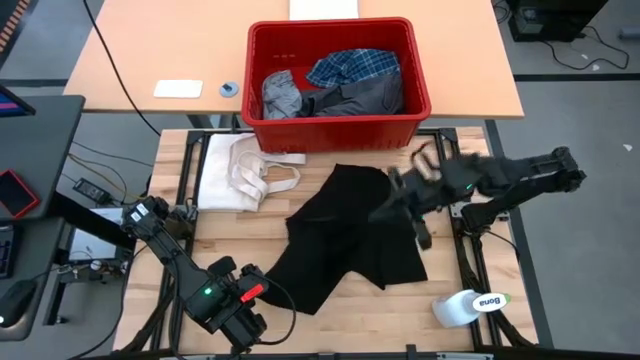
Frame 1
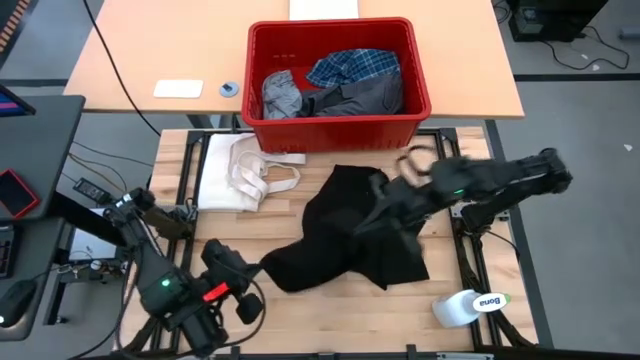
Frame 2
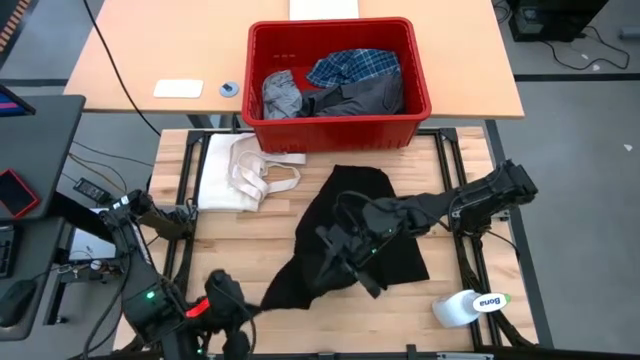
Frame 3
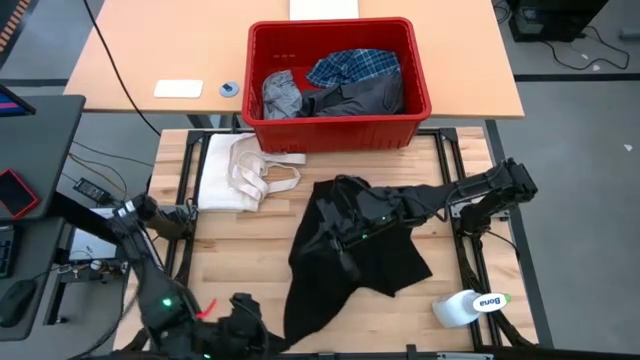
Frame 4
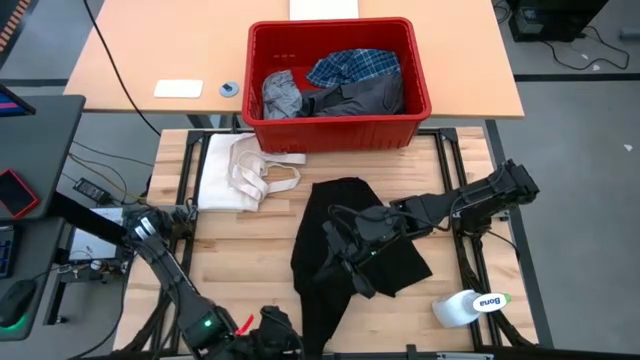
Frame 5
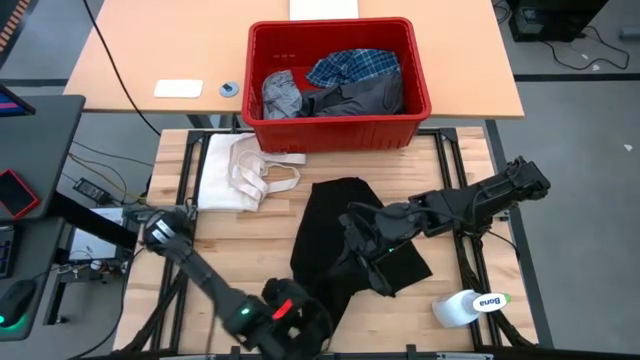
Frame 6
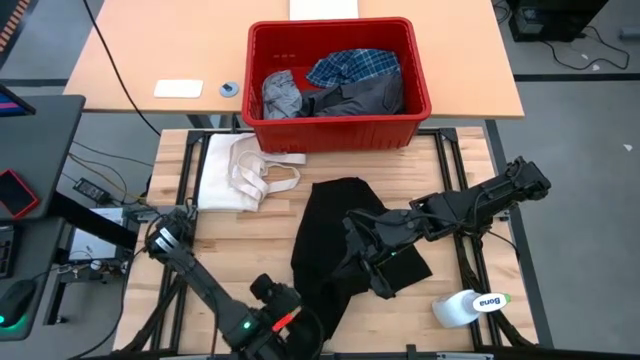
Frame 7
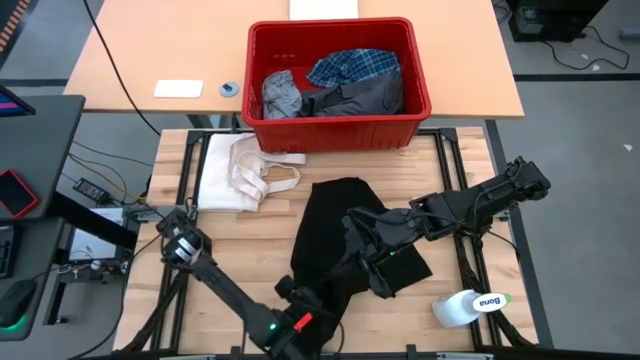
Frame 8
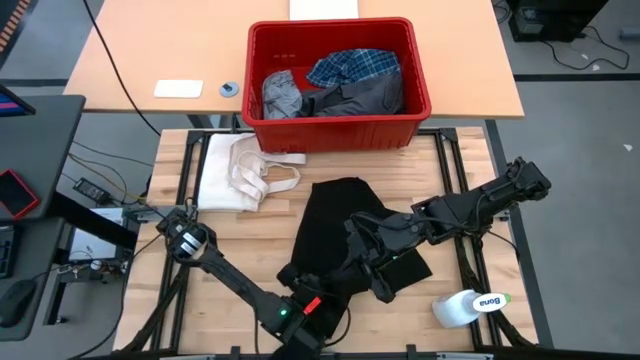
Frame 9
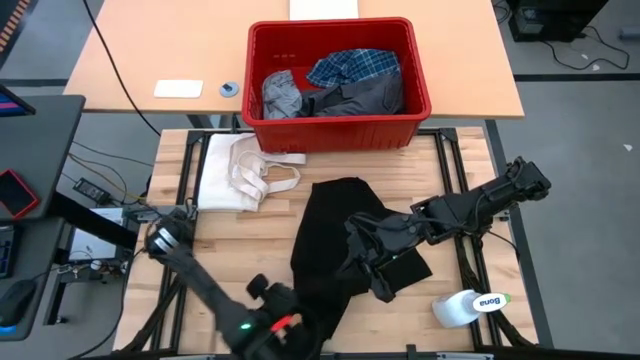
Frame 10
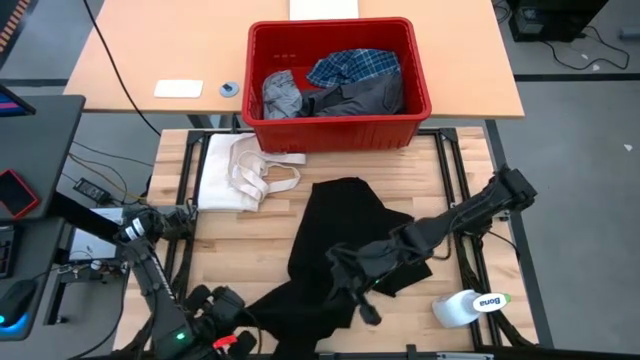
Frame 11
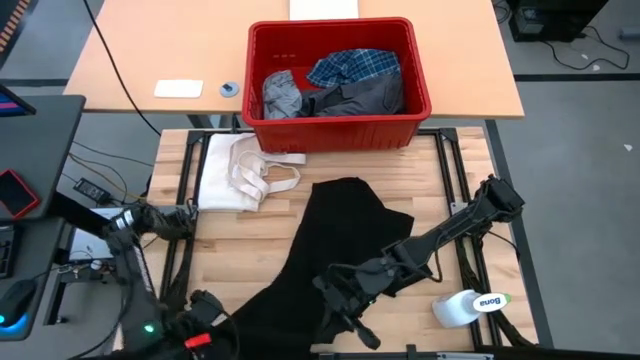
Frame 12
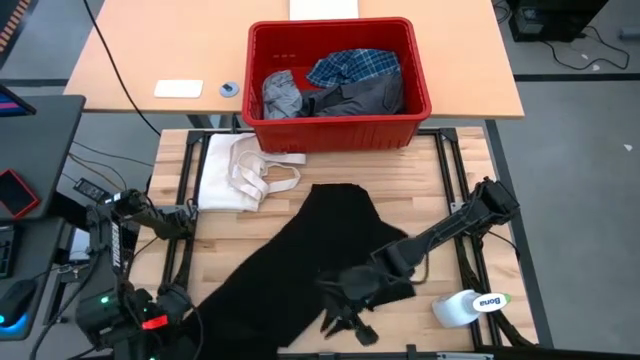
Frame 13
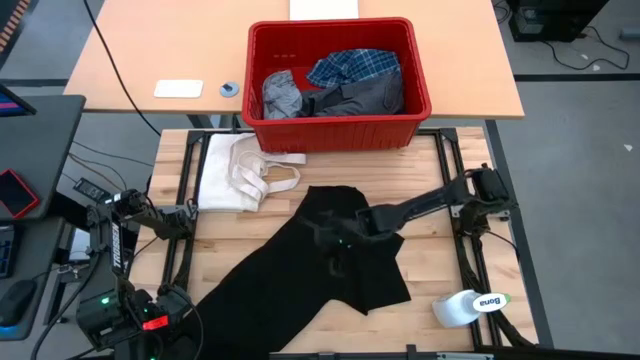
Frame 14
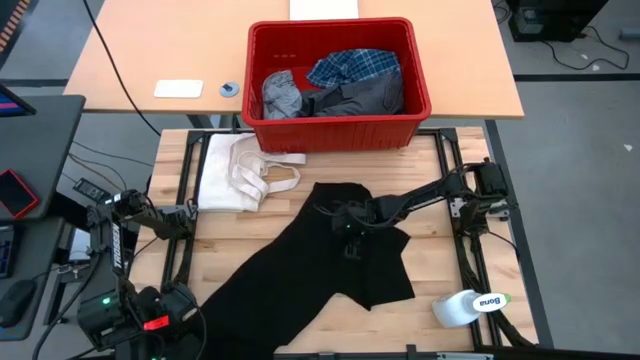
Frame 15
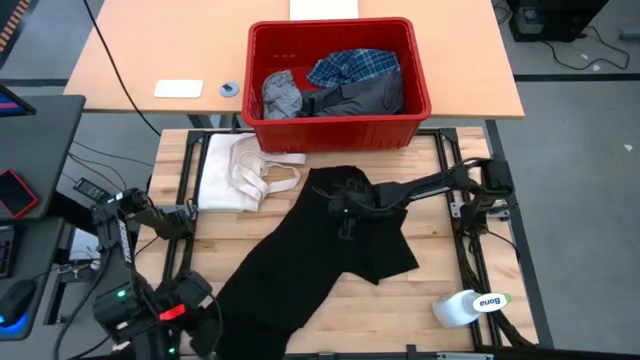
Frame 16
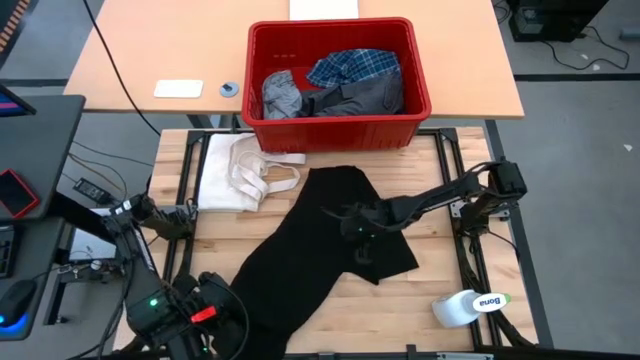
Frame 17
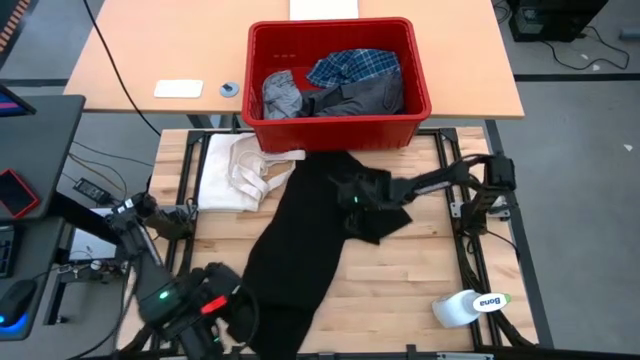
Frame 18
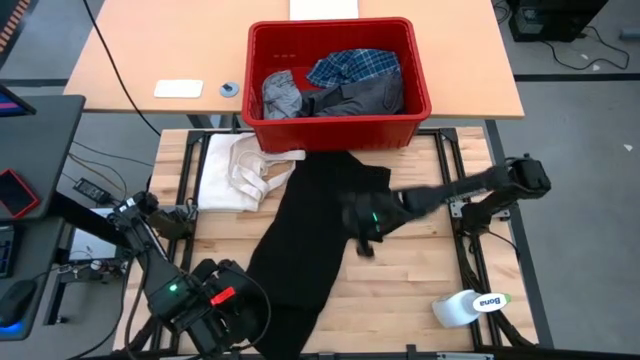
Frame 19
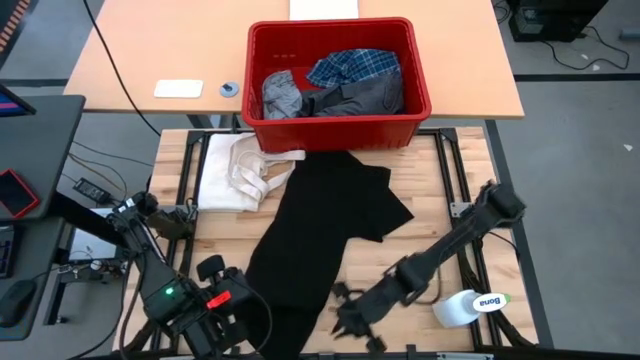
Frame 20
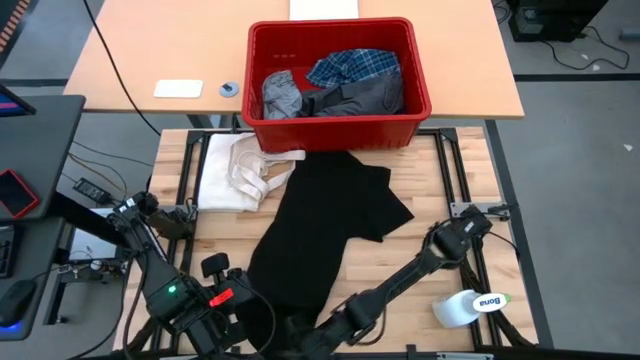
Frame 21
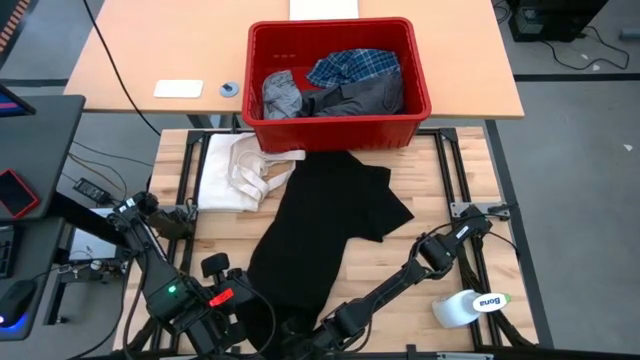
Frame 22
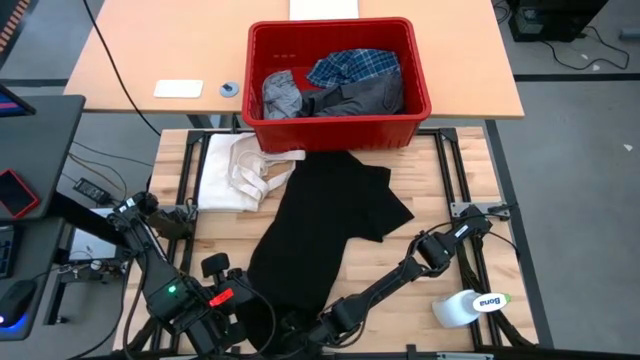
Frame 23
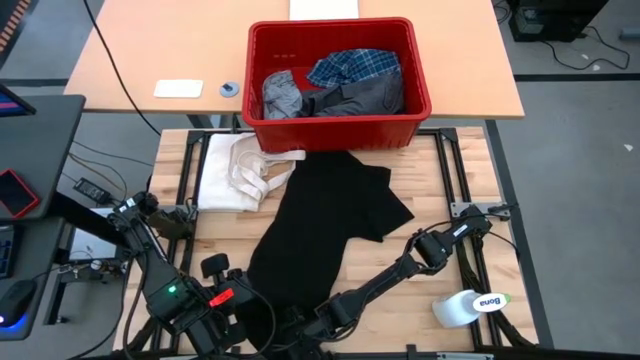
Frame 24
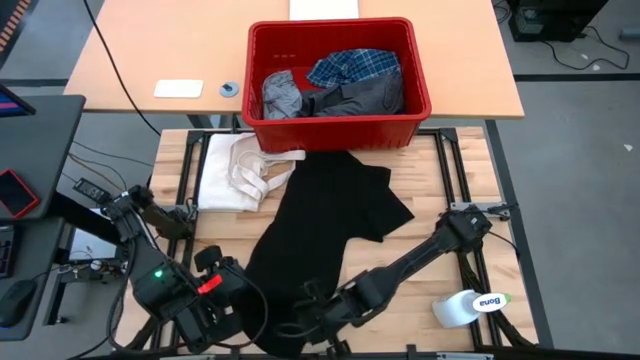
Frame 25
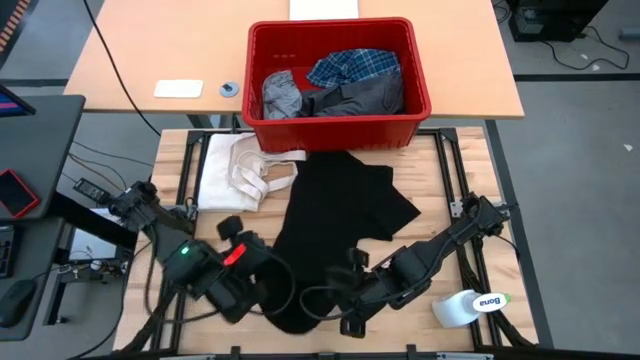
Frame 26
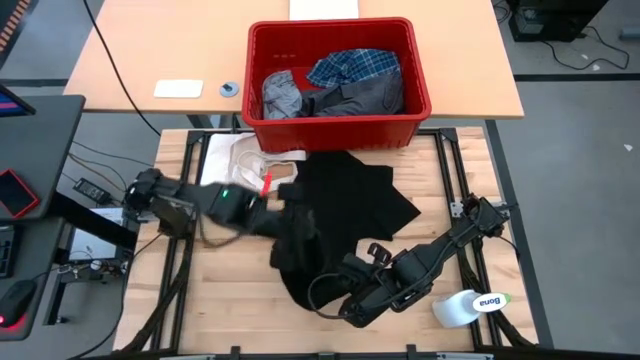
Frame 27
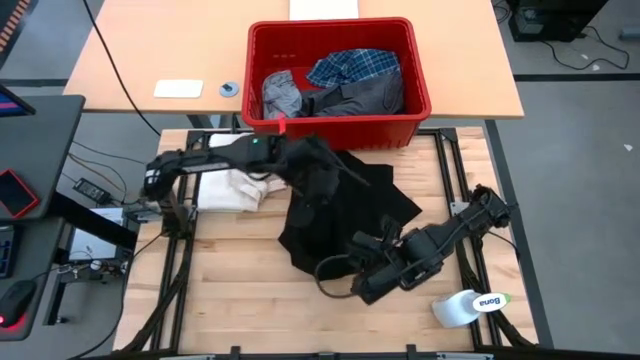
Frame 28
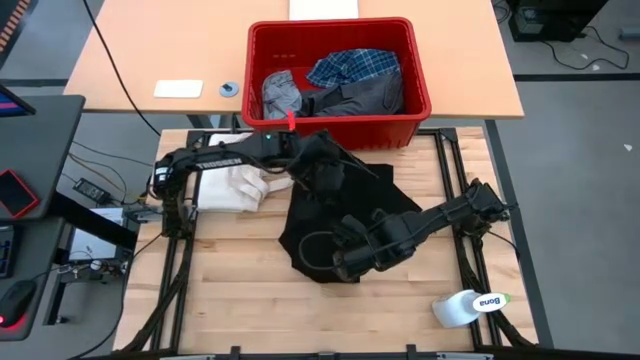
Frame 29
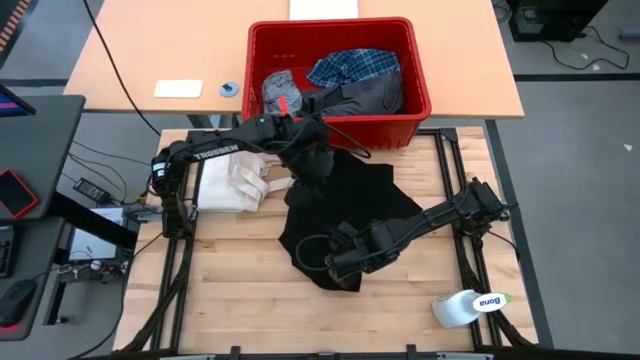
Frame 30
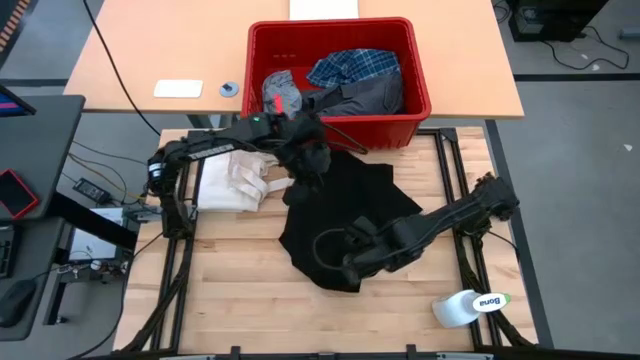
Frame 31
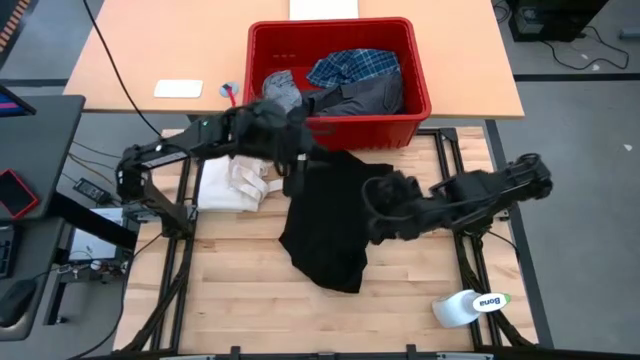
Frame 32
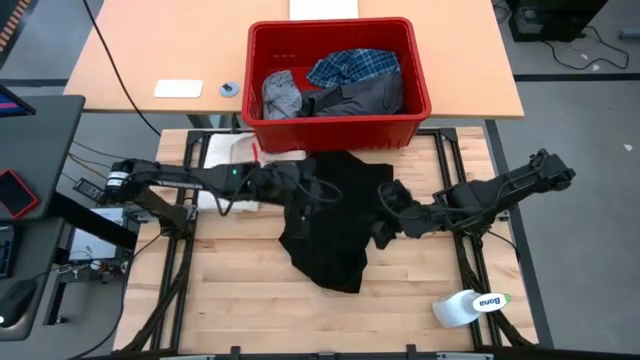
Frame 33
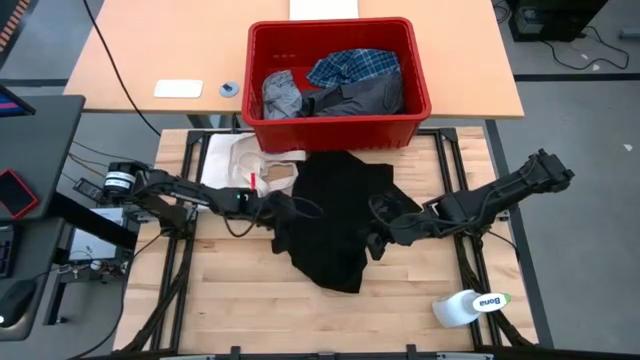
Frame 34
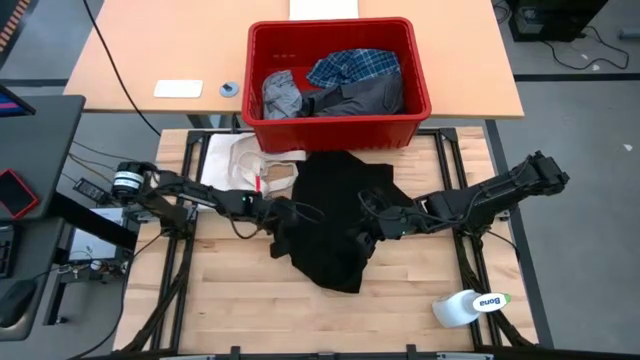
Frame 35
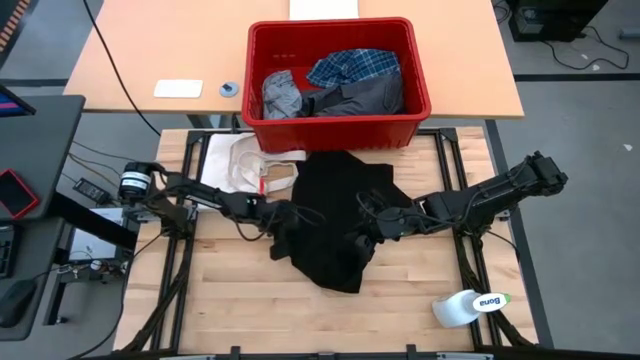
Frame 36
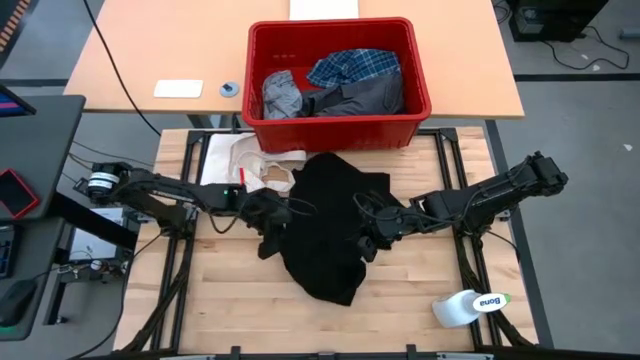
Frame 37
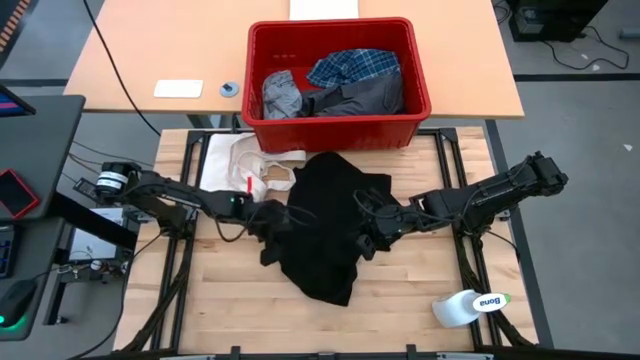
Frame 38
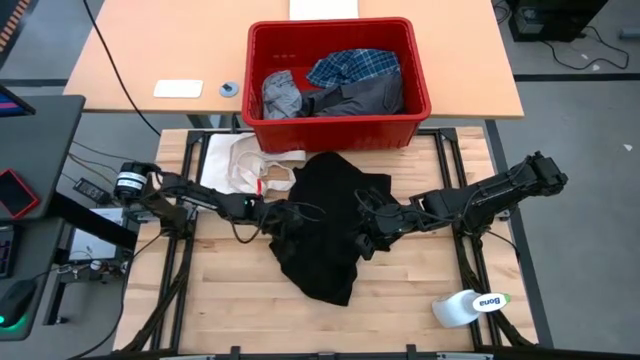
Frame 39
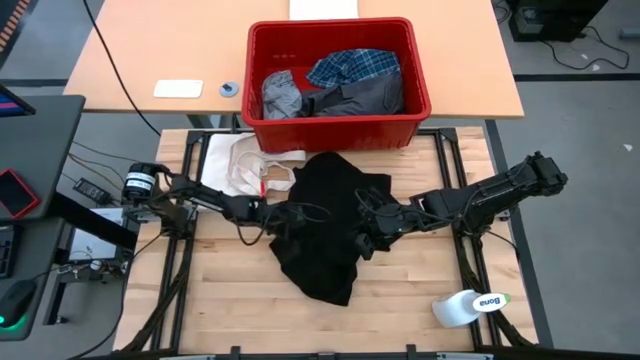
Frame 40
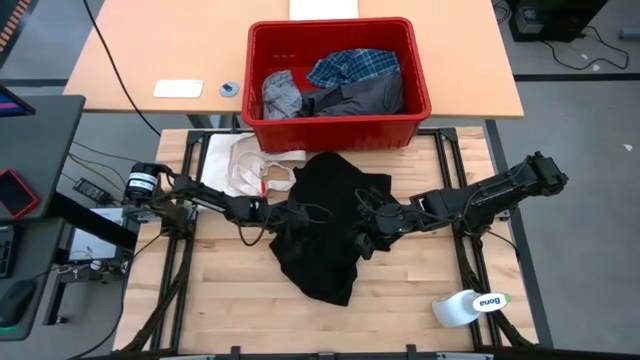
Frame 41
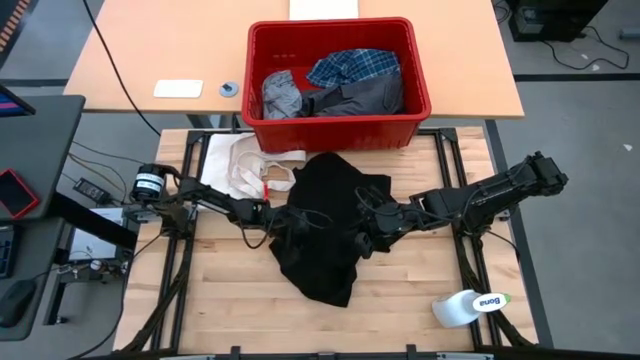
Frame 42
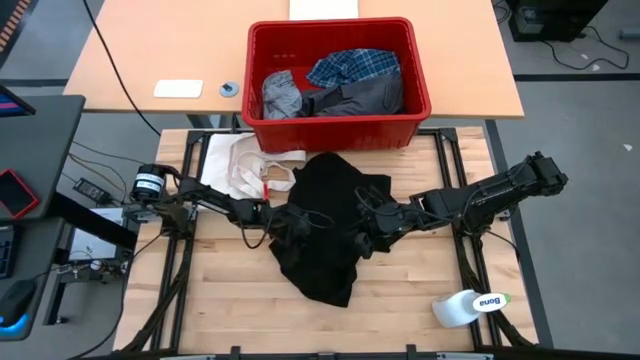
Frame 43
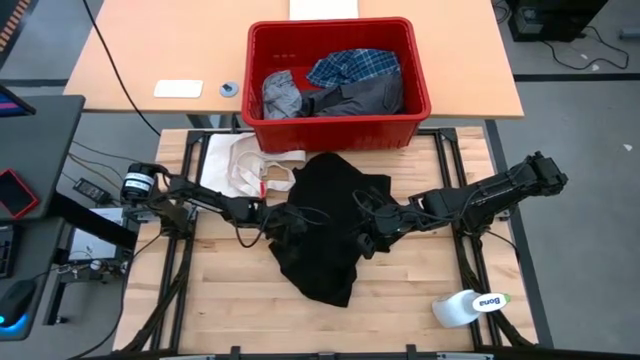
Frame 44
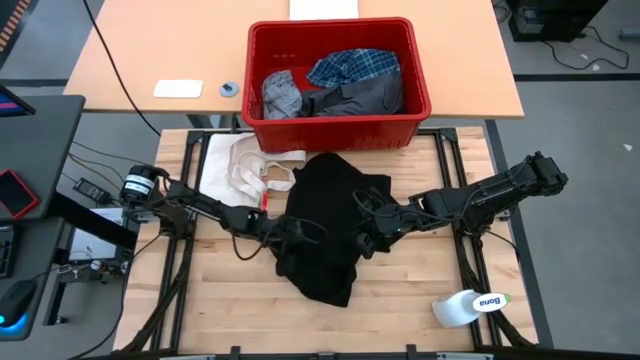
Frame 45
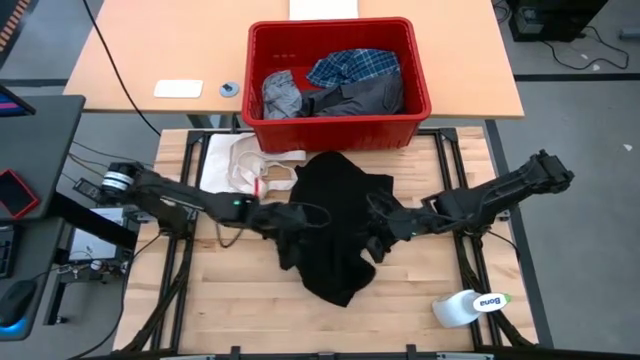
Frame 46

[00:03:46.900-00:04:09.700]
Task: Fold Laundry from Bin
Fold the black shirt
